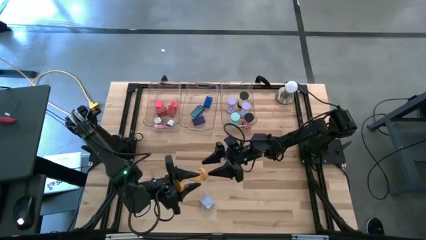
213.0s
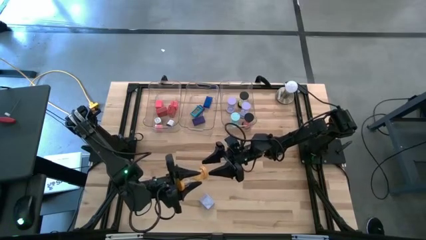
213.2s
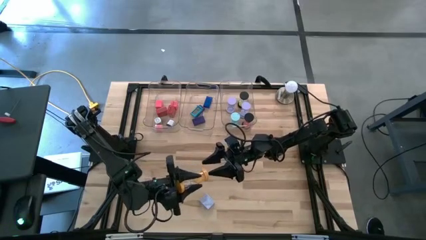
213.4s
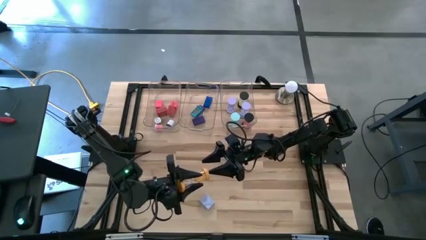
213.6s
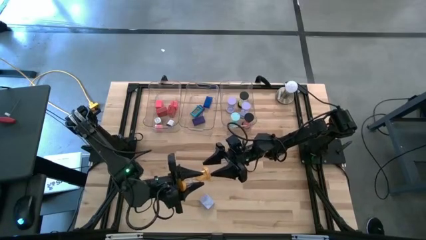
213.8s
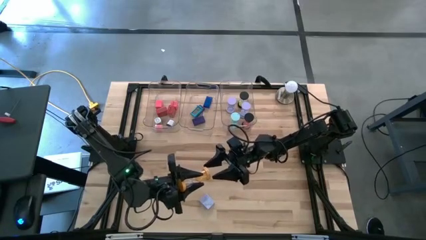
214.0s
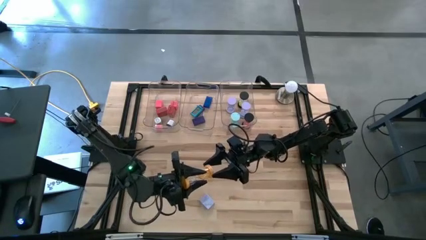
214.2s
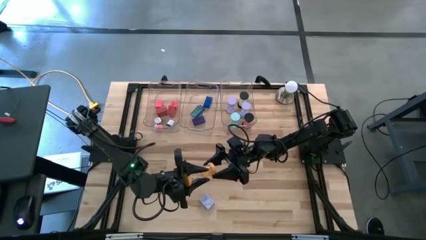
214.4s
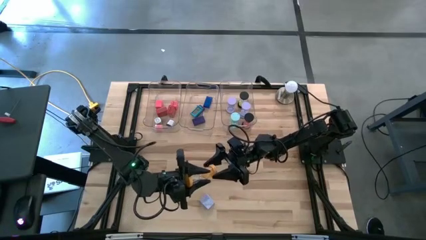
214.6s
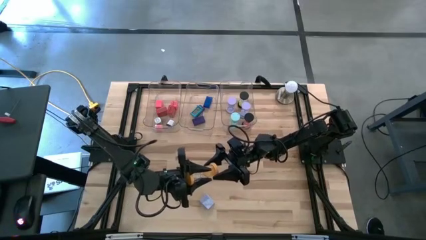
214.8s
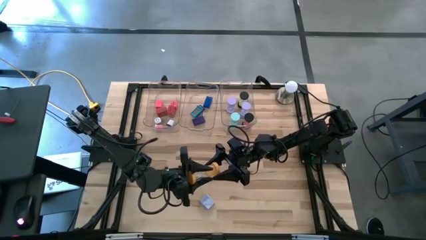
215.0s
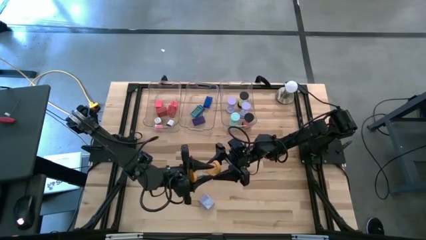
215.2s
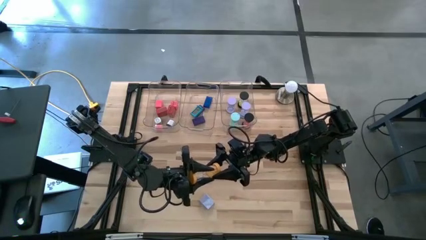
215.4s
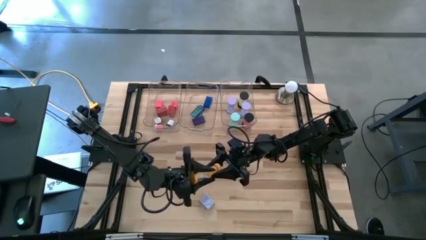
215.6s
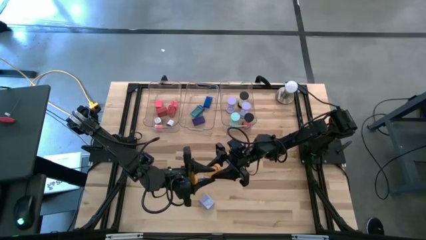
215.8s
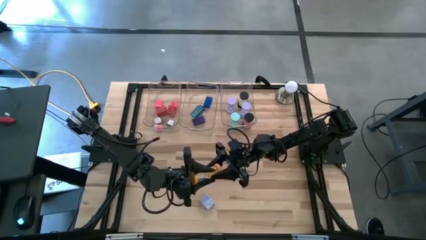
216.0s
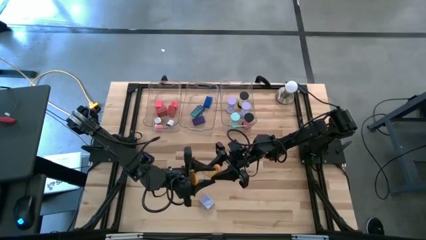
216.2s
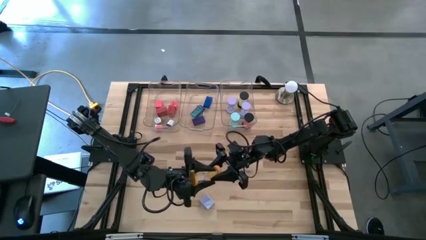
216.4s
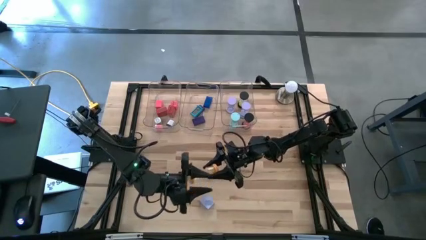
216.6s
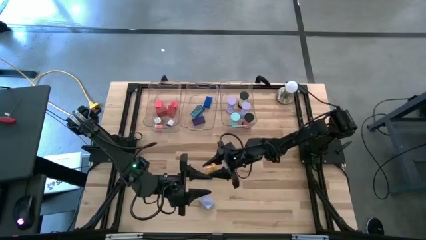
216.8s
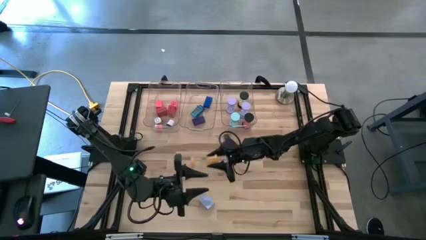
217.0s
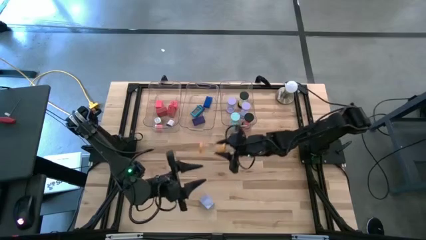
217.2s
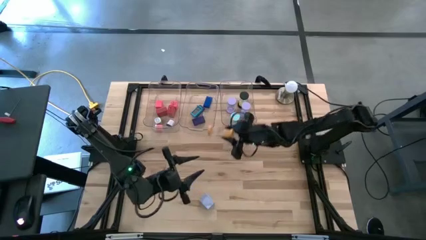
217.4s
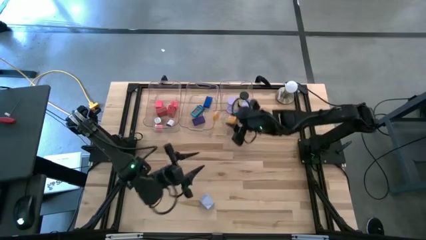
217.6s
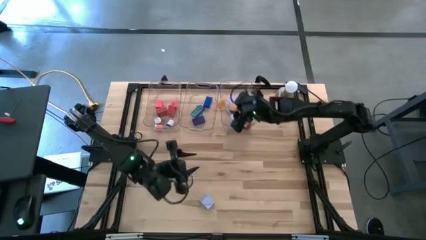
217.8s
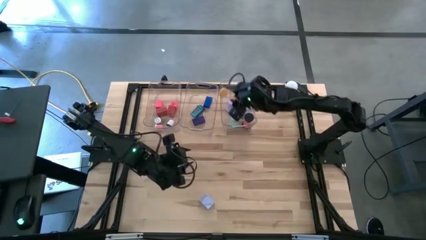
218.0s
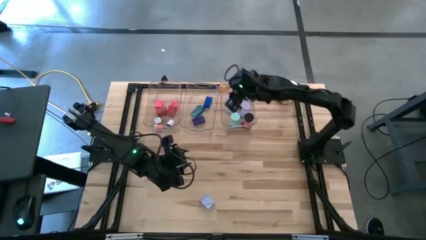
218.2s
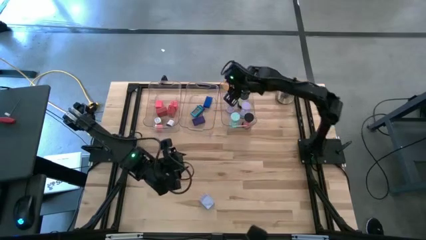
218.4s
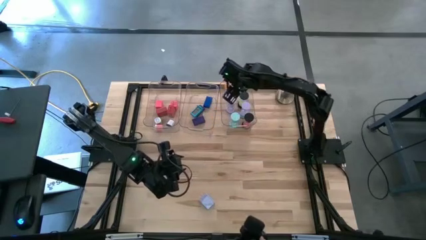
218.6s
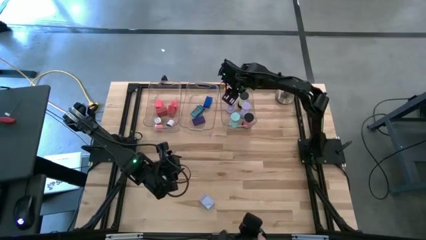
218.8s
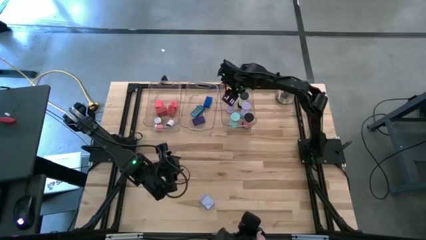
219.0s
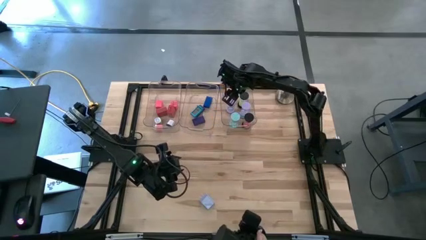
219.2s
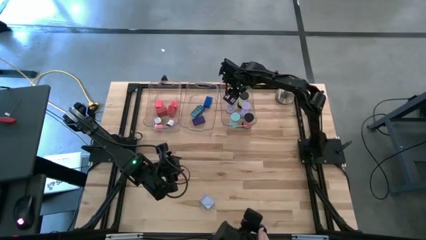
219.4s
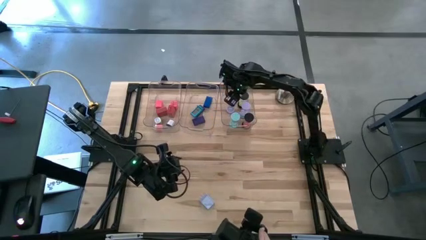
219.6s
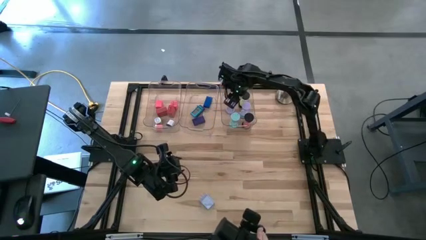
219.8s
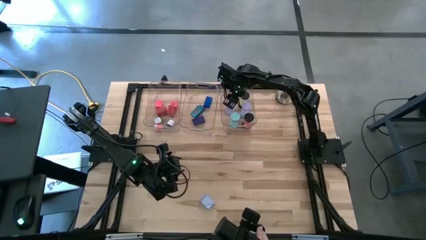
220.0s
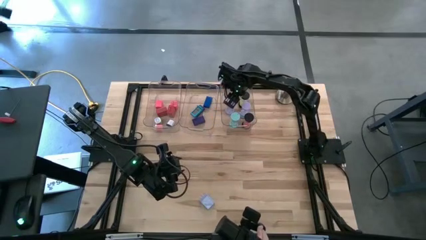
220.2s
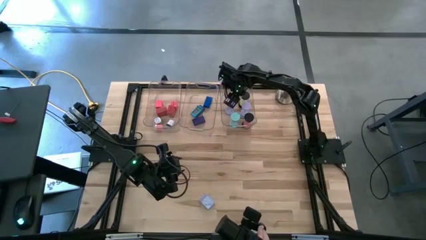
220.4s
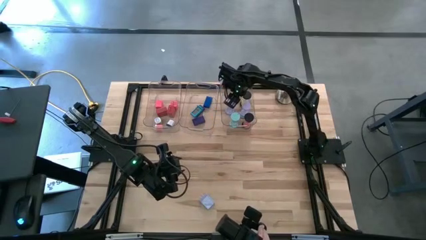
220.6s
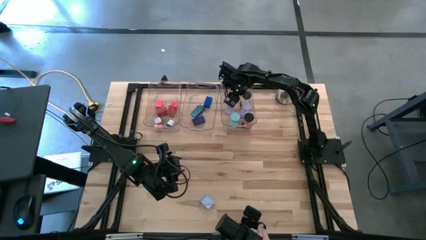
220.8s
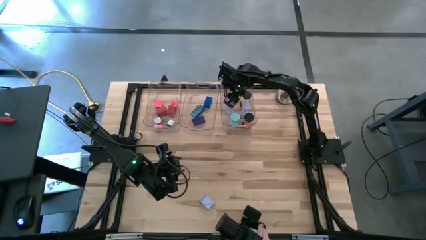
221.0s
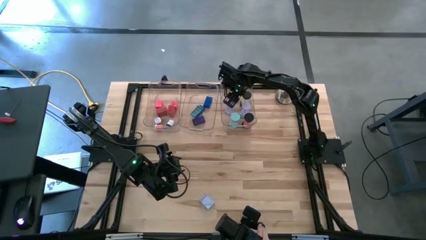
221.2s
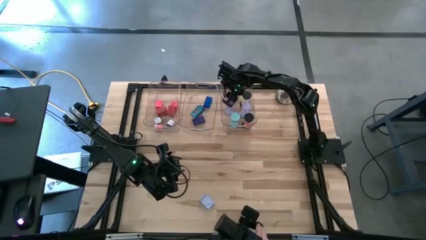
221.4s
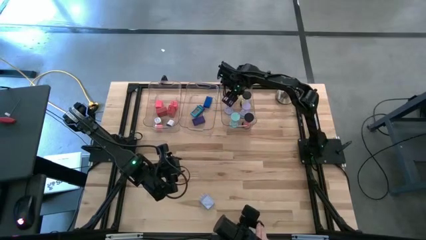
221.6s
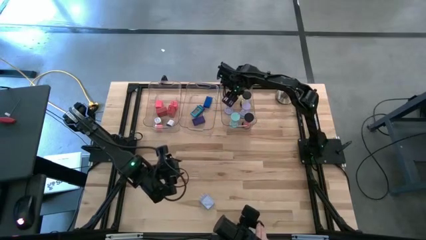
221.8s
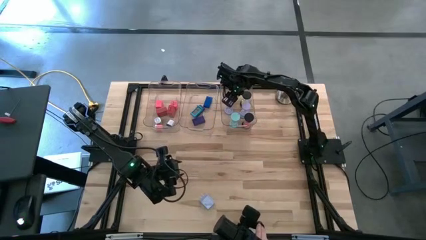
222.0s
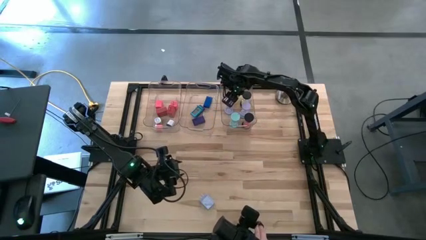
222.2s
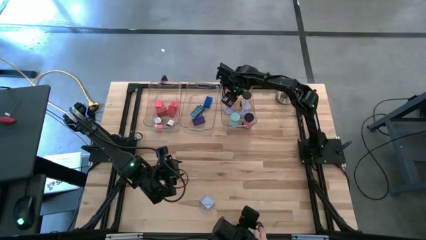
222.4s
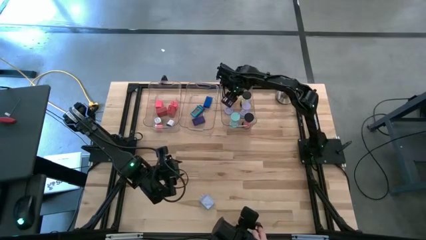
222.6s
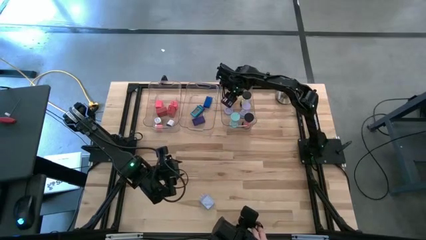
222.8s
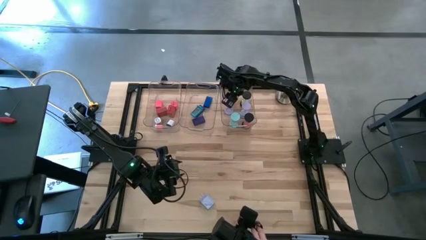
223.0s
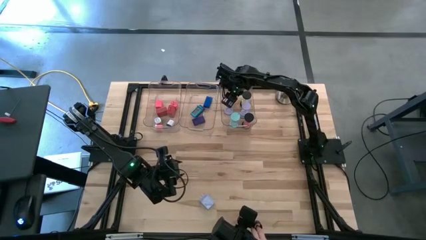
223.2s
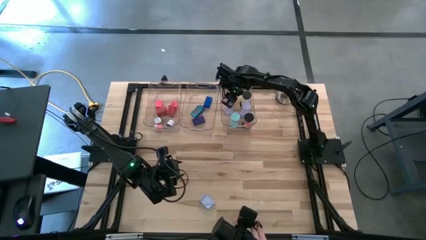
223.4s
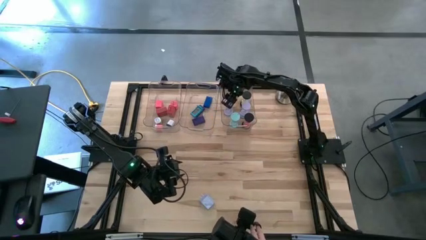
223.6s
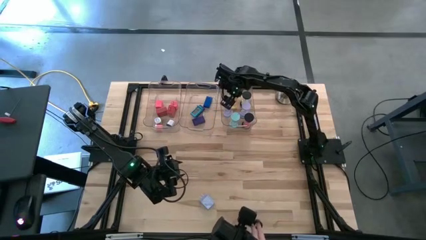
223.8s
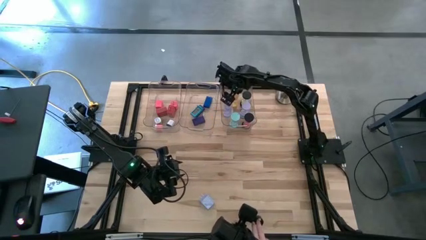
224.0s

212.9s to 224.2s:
Task: Pick & Place Office items
Put the yellow hourglass into the right transparent bin

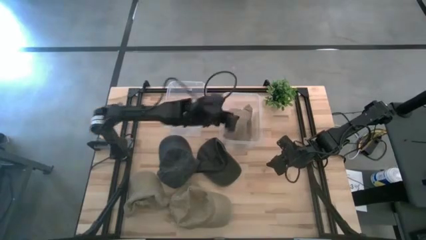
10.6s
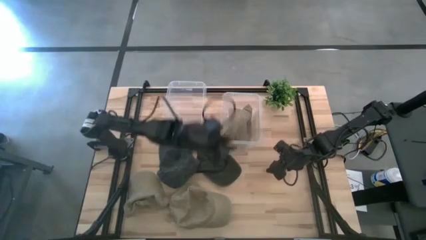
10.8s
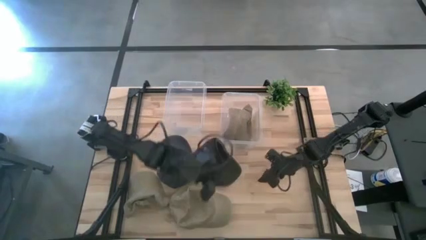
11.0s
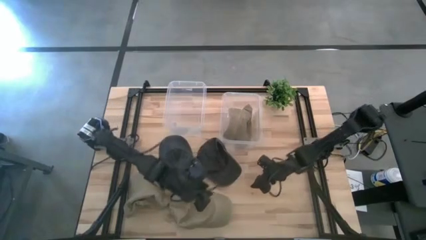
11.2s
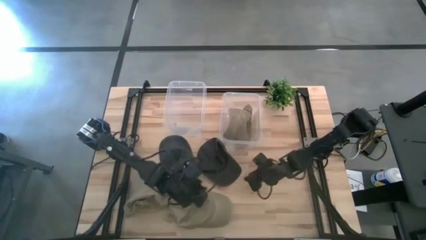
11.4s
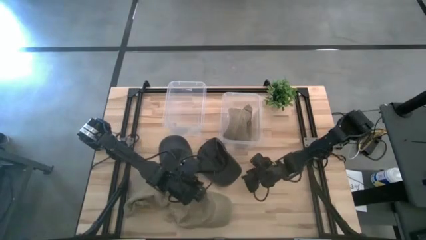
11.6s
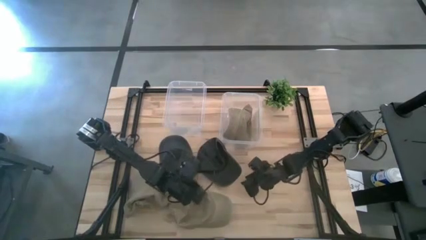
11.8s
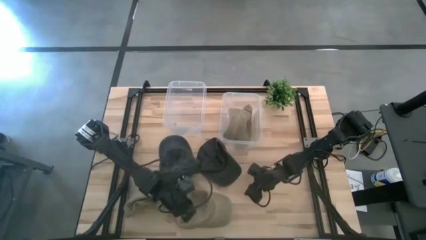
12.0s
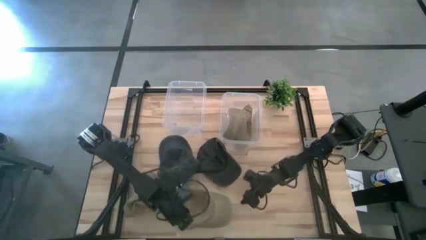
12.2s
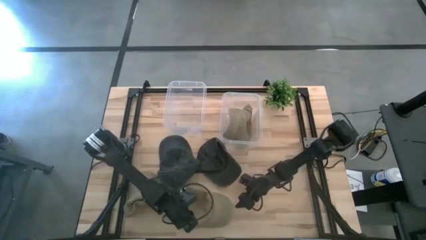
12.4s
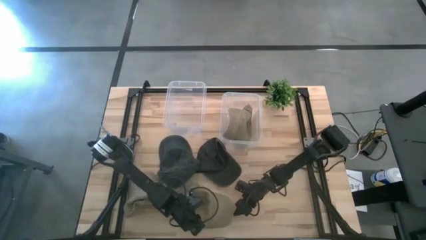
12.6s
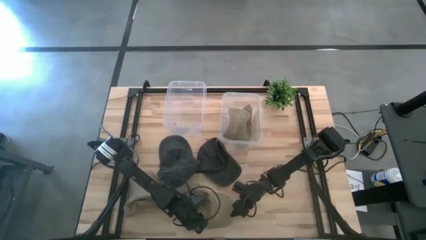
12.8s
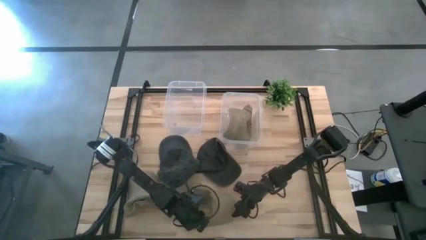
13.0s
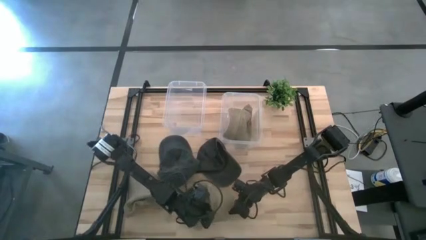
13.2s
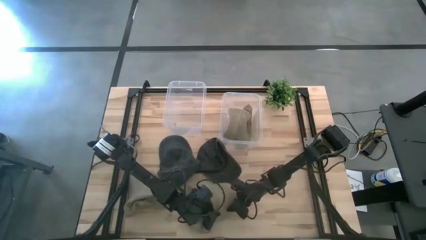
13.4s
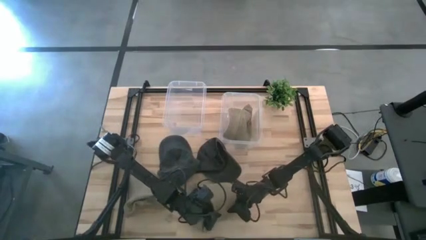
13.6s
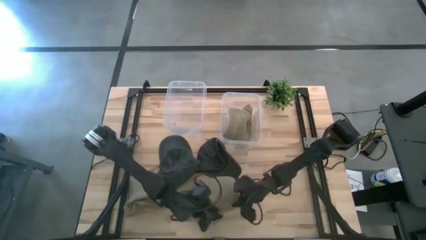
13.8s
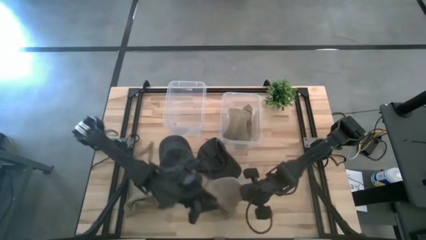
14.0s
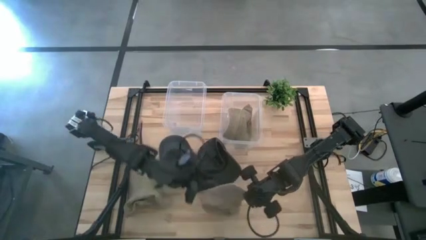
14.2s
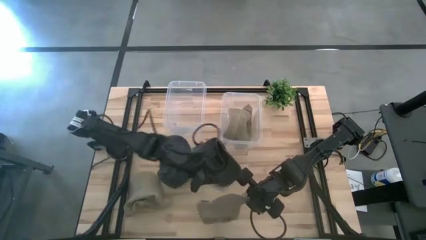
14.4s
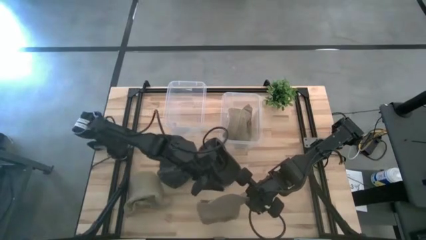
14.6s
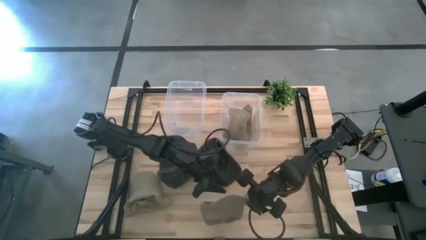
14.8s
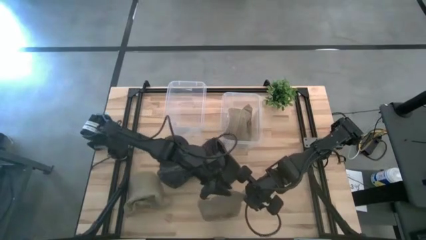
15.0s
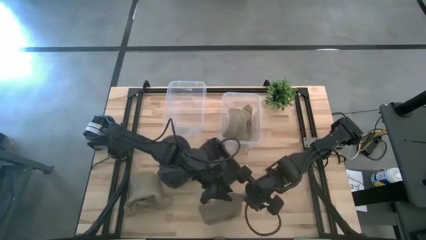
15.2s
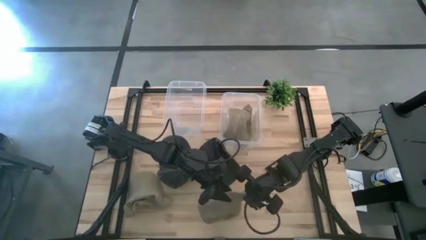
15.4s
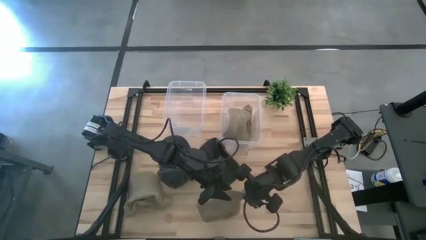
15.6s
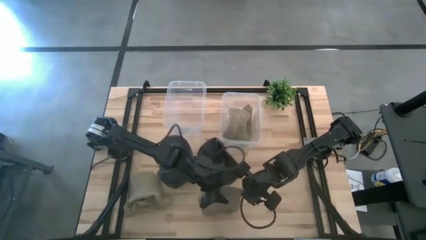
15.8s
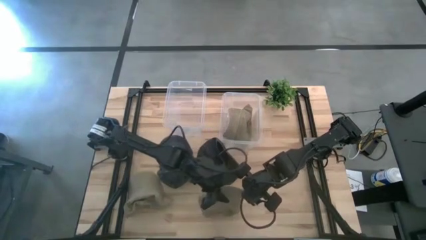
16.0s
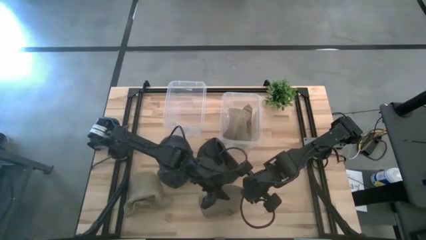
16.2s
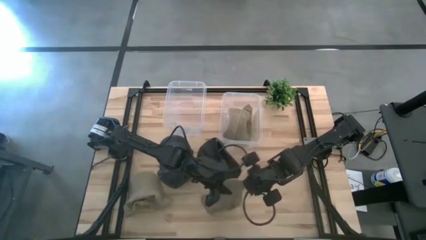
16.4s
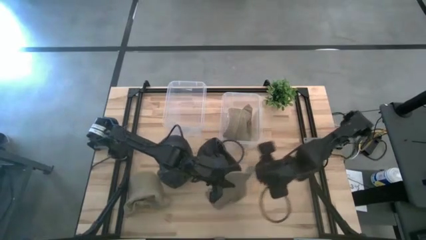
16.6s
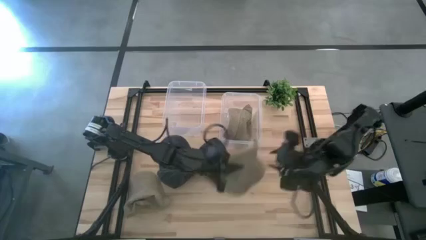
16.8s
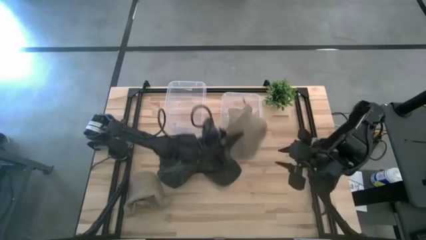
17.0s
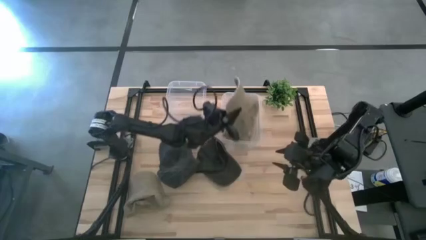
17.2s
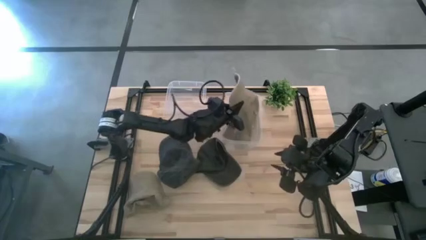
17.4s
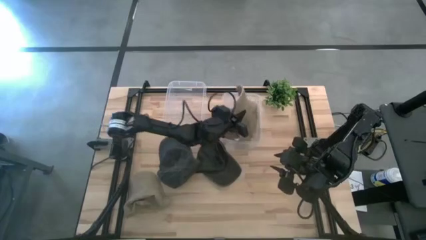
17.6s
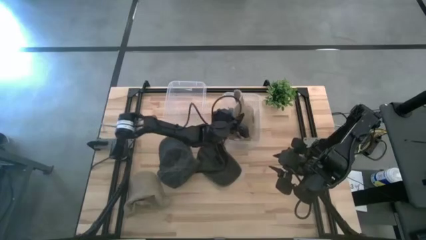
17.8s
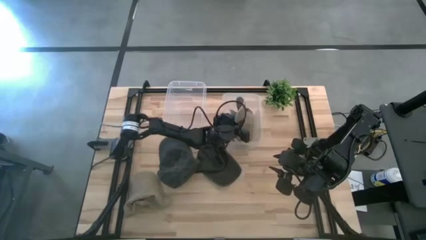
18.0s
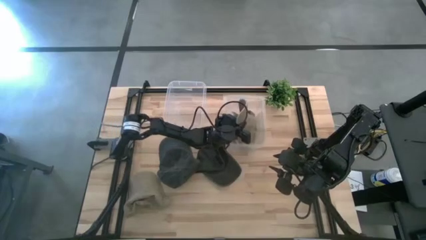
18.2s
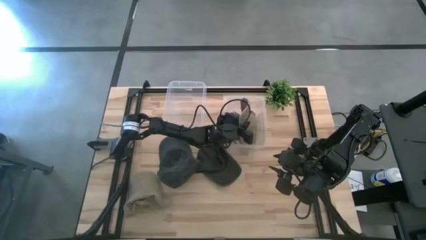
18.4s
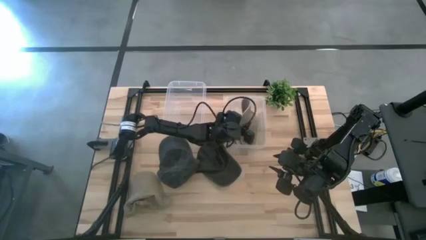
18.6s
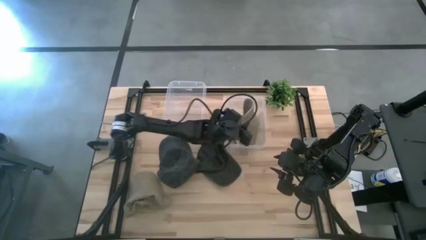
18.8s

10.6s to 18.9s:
Task: Pick & Place hat
Put the right brown cap into the right transparent bin
